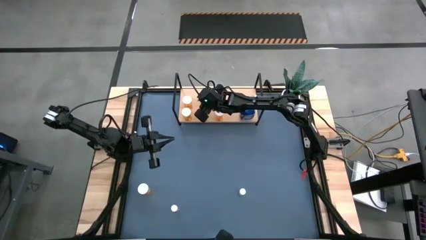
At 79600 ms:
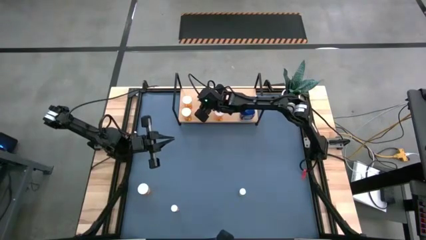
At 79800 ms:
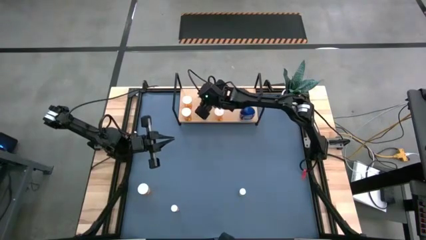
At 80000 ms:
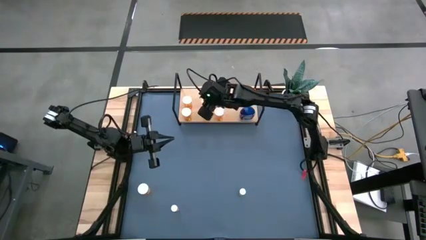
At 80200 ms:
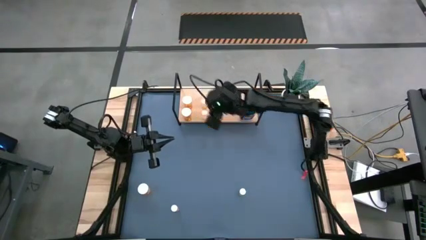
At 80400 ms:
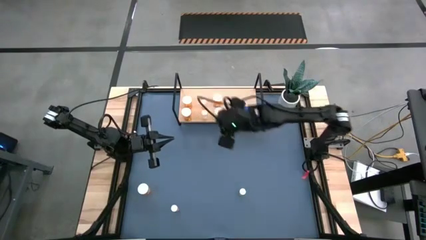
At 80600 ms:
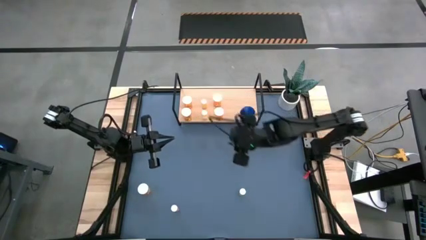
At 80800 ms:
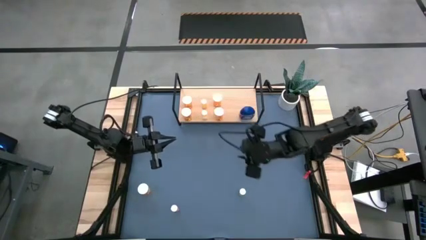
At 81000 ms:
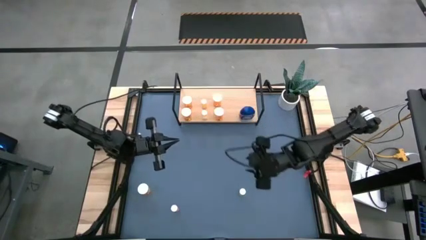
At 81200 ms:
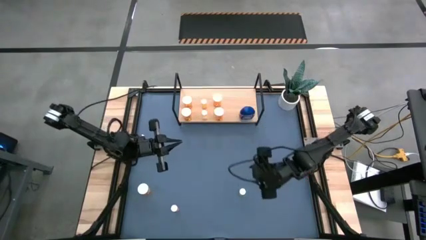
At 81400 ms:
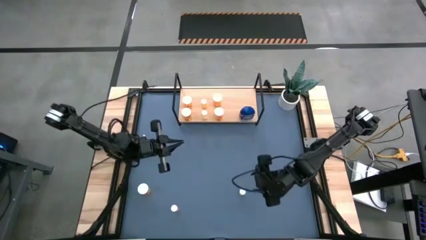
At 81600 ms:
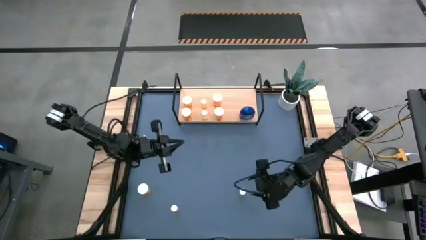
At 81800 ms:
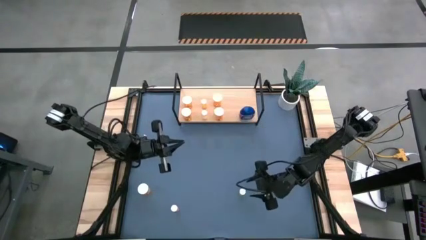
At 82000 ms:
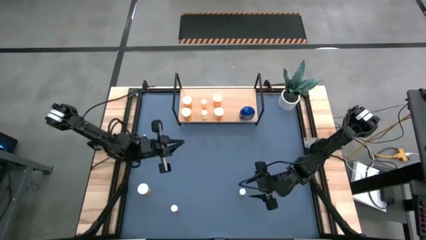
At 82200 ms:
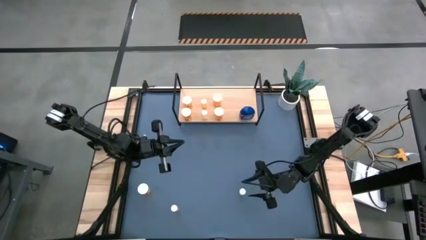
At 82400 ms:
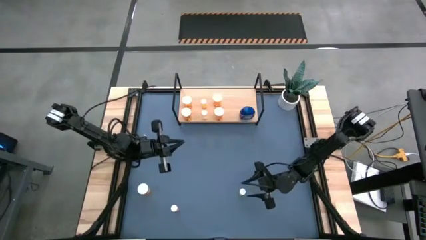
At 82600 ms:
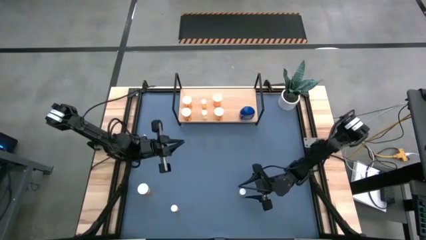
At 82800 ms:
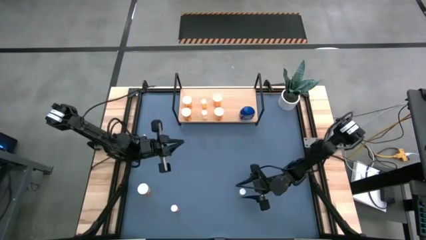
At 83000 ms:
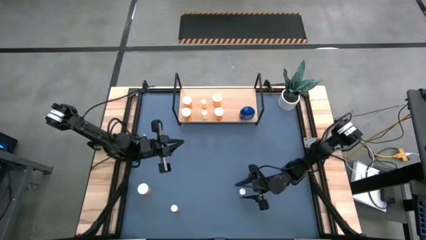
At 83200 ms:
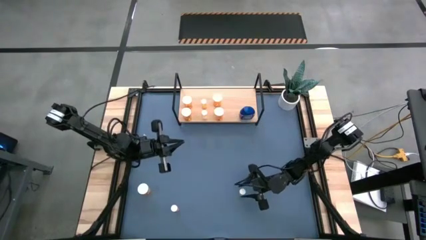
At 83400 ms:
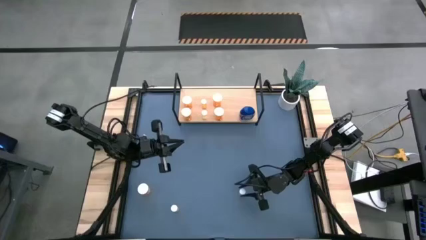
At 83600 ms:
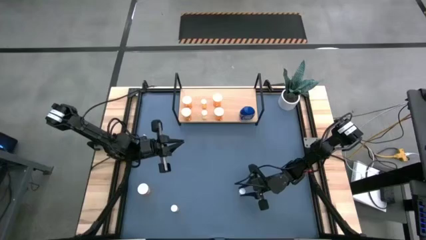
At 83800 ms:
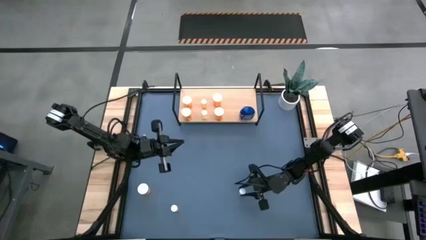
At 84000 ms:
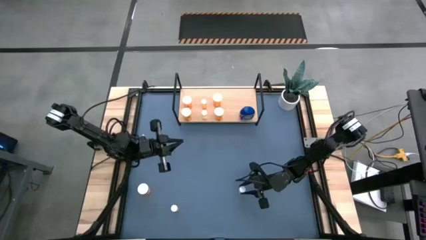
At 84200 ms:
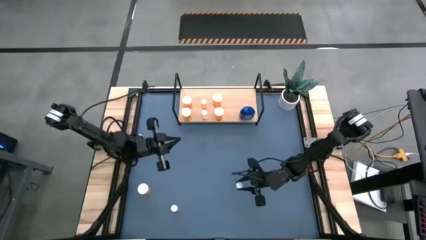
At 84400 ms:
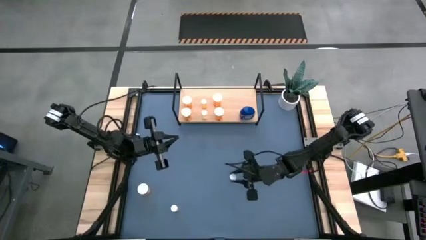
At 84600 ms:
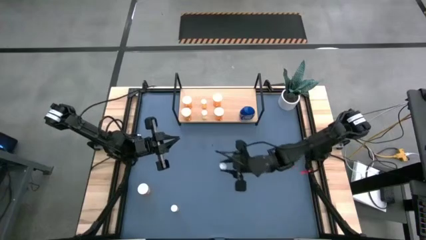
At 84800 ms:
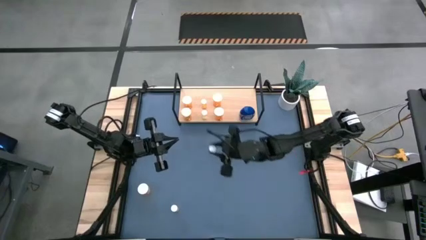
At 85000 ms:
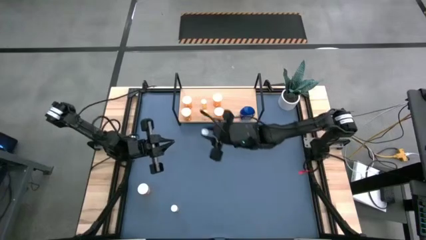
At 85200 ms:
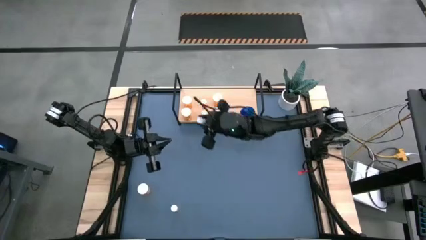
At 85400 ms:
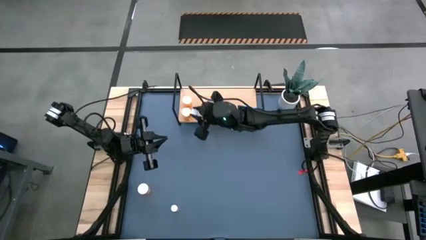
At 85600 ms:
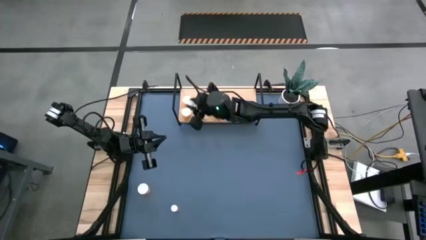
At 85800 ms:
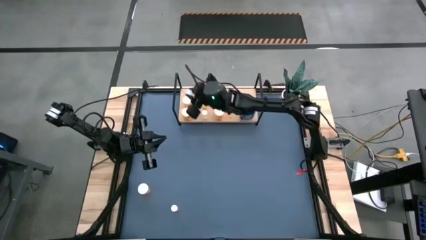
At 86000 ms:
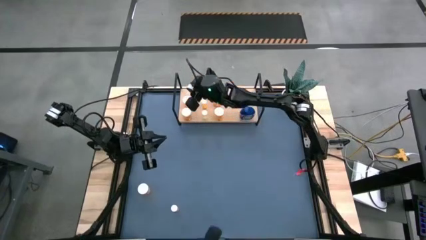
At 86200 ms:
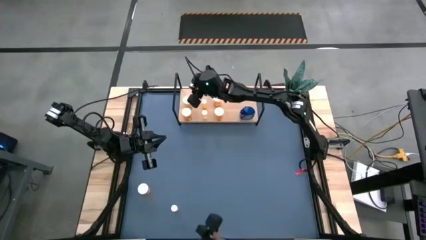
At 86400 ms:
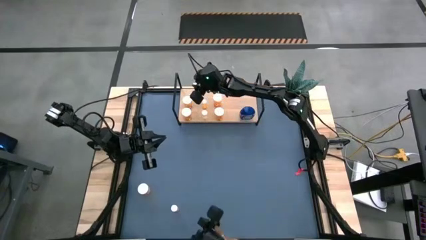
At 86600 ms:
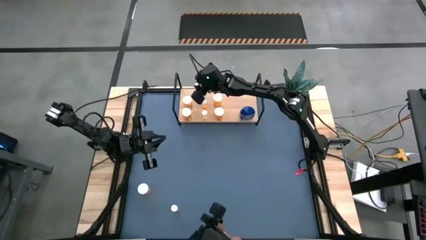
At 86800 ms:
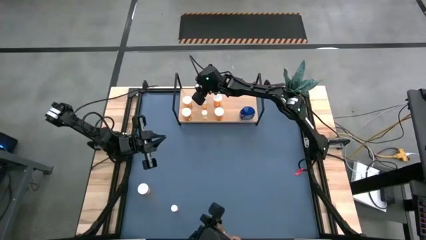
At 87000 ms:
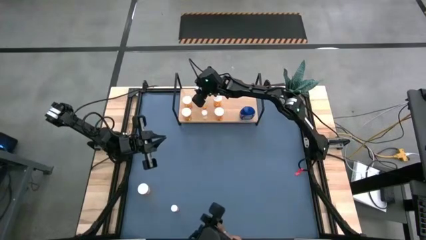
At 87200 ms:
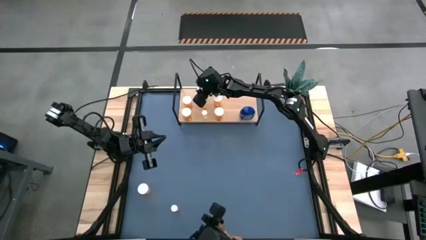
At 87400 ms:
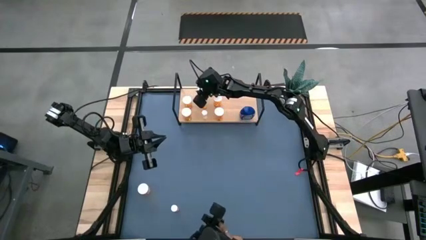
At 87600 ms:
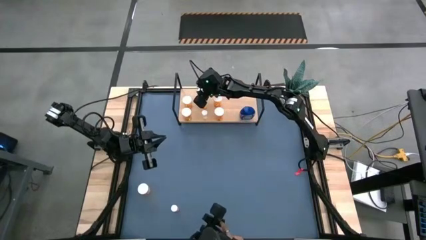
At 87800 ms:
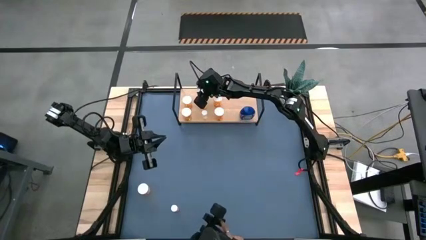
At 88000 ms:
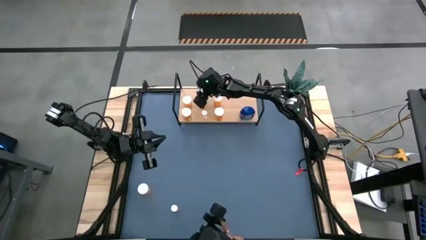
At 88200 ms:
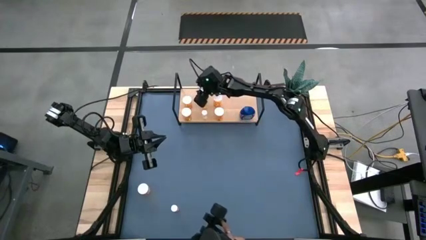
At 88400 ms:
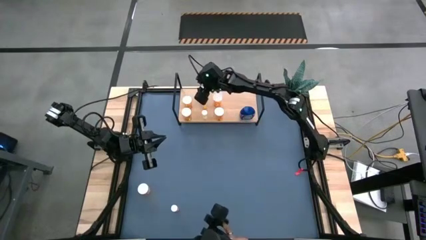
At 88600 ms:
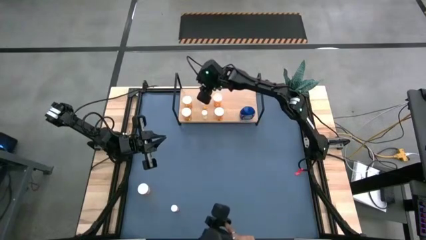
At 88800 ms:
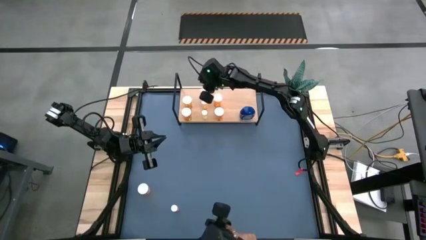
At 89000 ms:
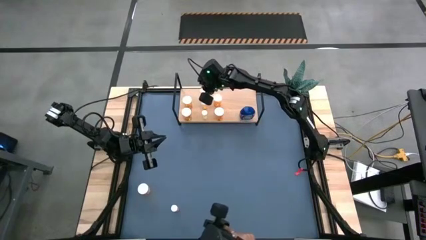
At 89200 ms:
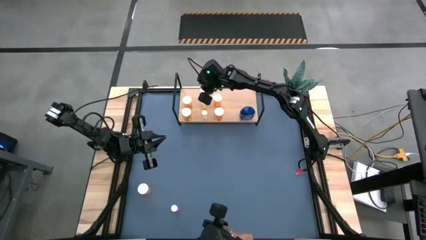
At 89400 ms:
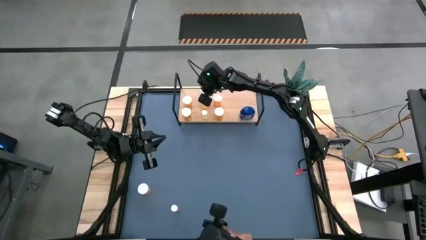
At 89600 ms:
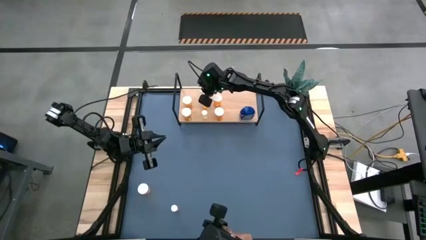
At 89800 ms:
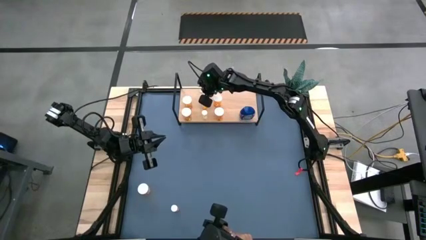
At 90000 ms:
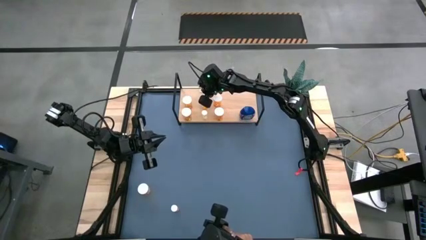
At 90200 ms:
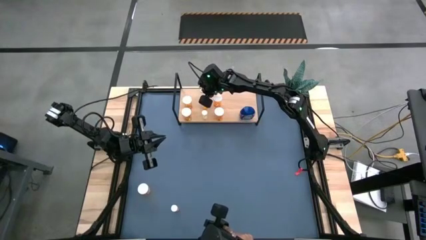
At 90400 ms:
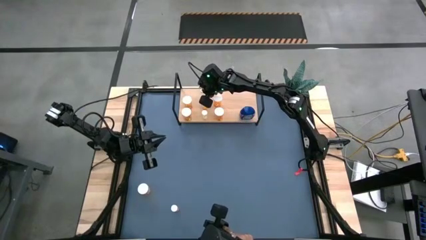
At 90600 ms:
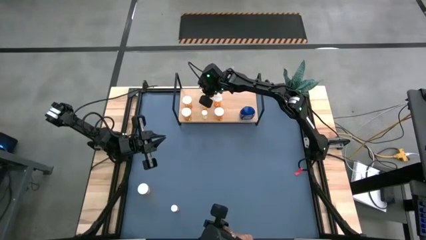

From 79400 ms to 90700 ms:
Task: Pick and place medicine bottles onto shelf by color
Put the yellow pill bottle on the shelf
